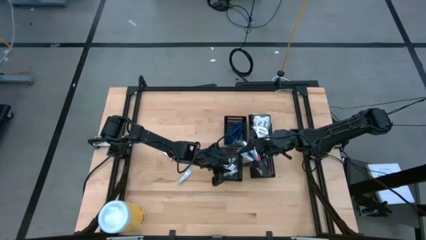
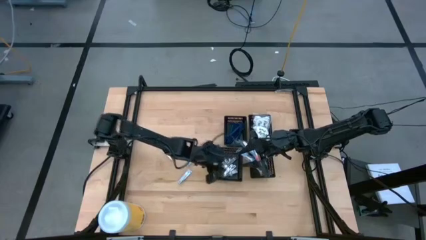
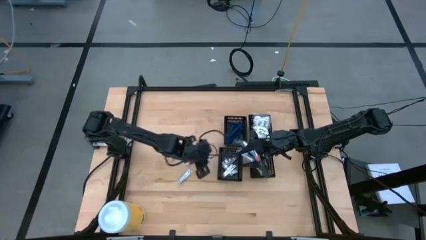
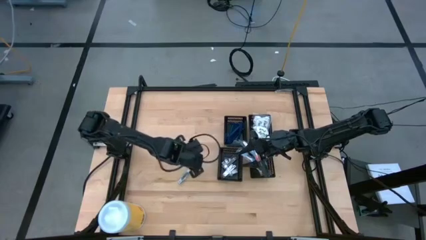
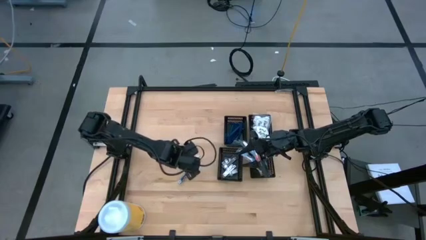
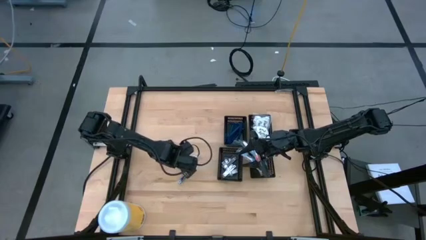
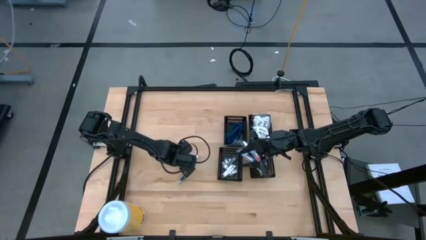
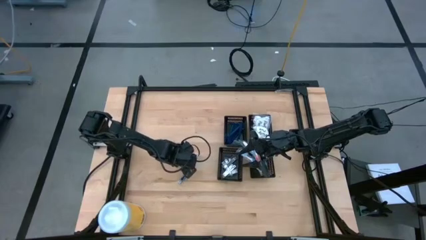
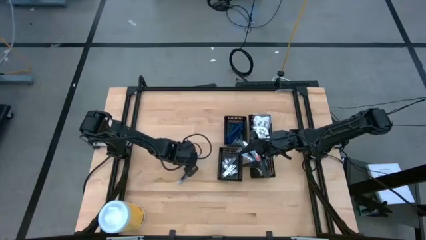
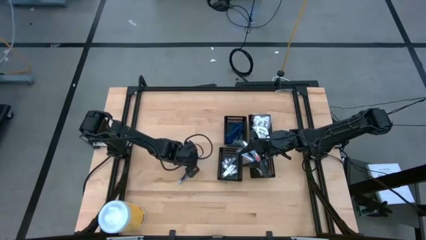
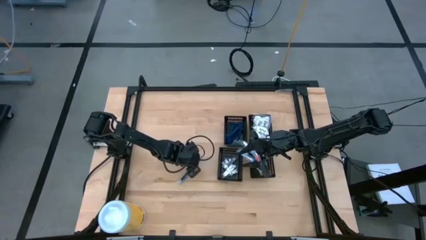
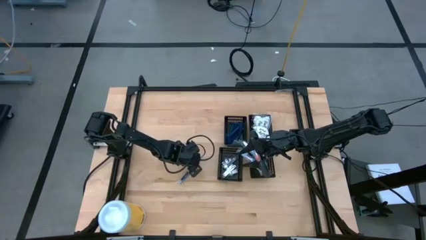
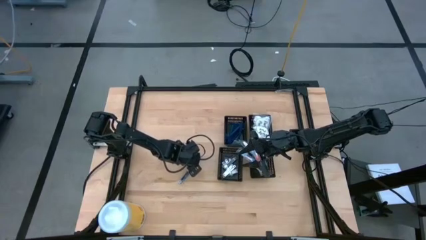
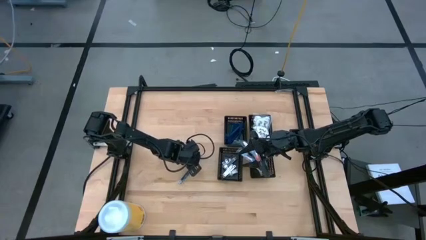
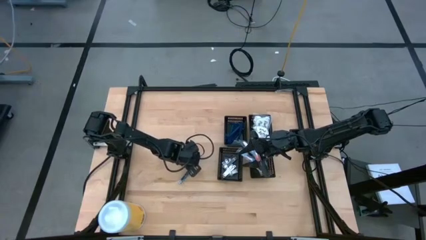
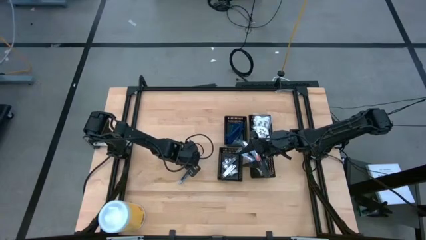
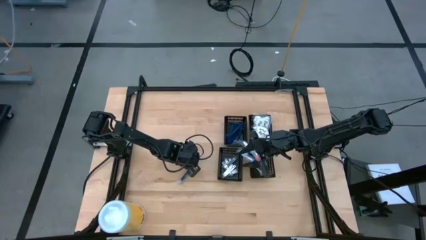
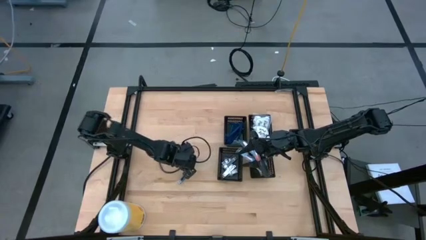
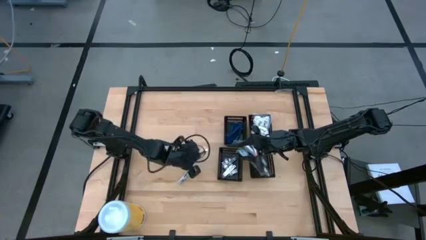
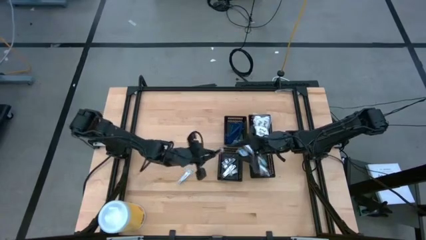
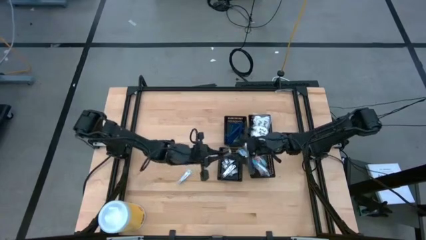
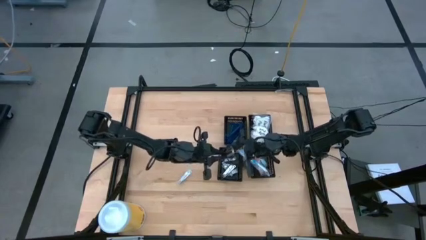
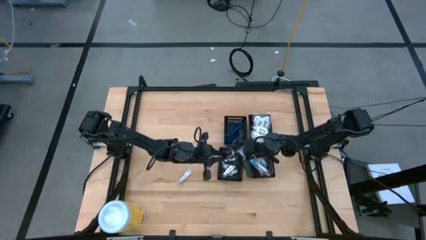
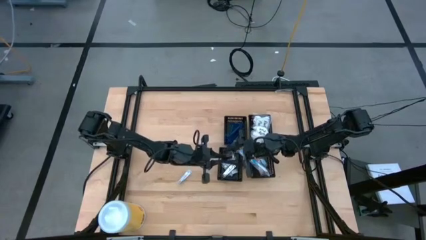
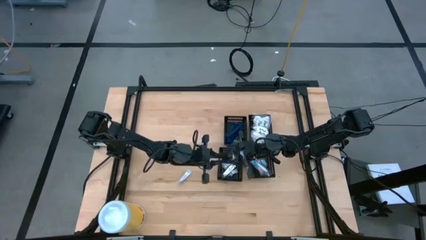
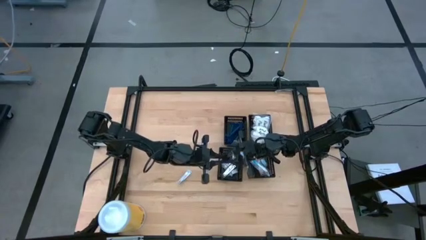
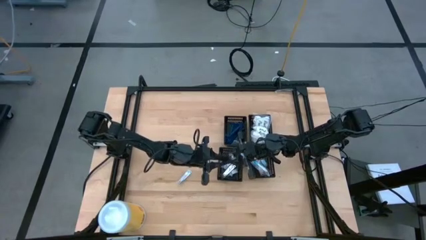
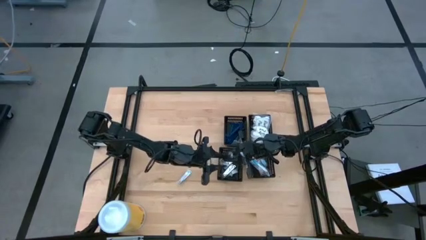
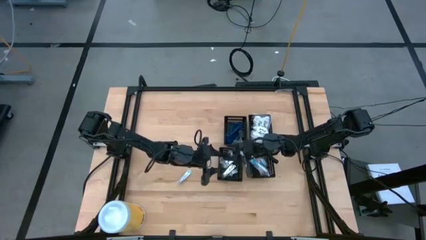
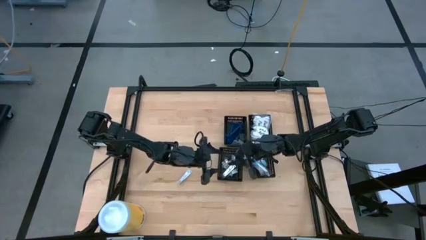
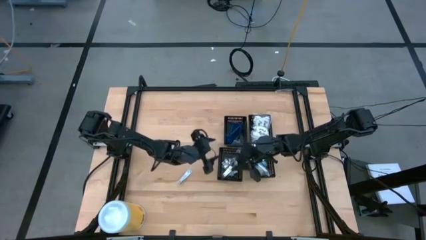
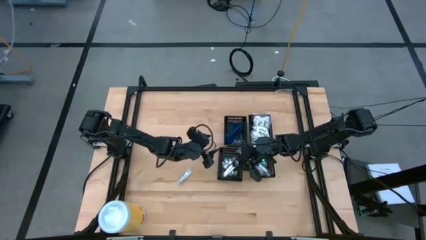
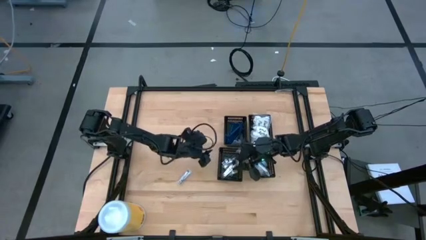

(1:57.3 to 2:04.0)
Task: Pick & Place Travel size toiletries
Put the nail cutter into the bottom left black basket

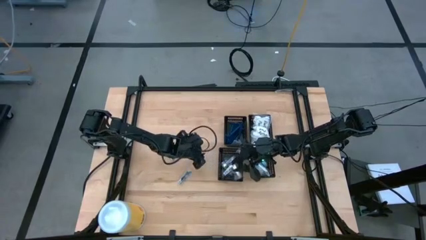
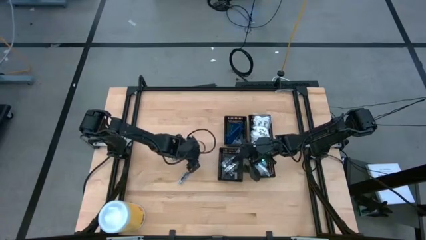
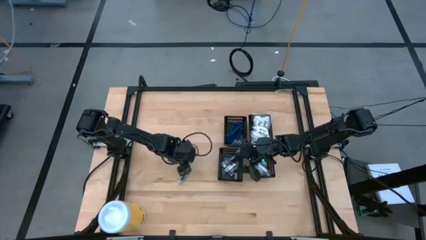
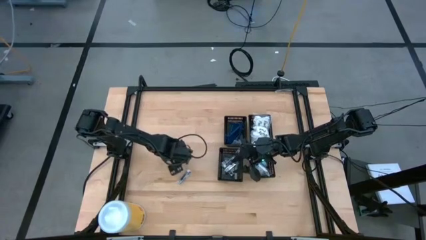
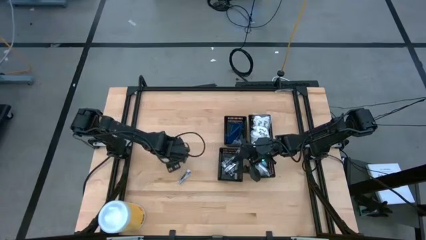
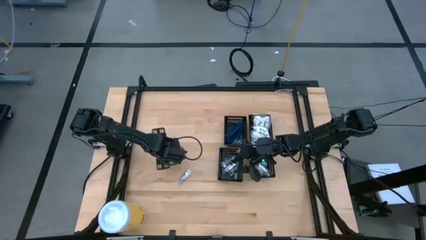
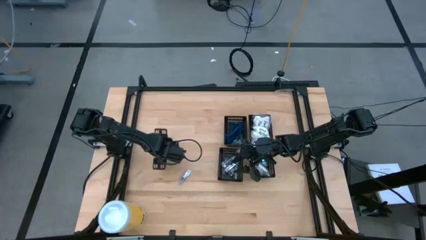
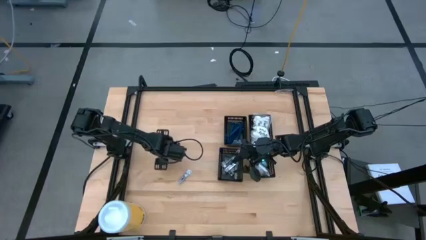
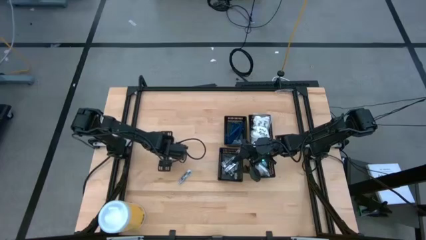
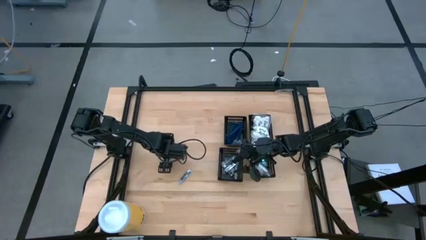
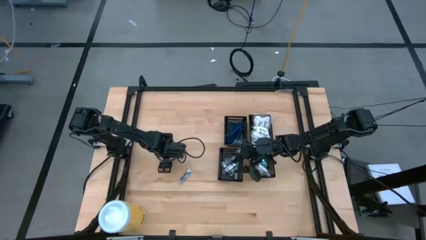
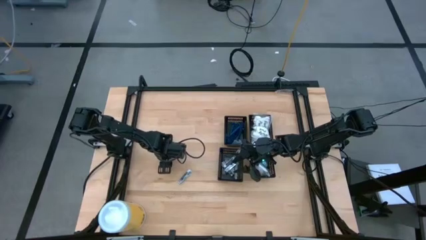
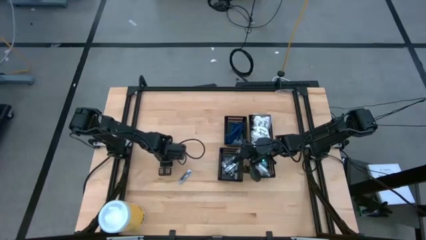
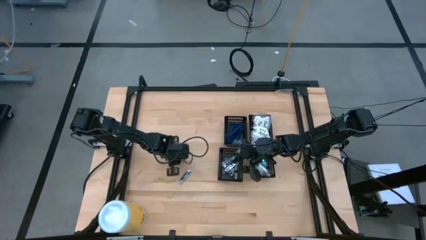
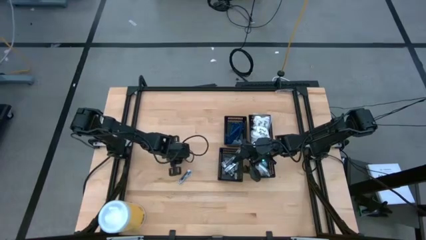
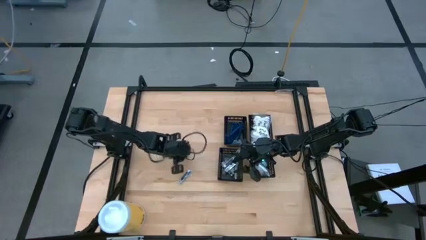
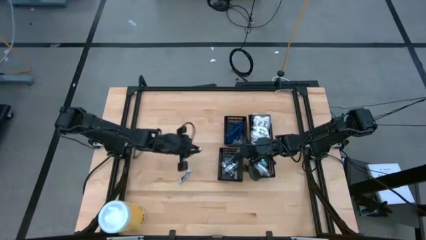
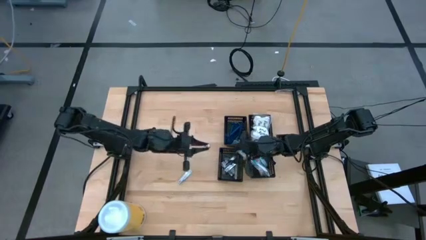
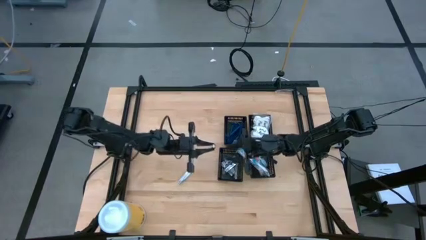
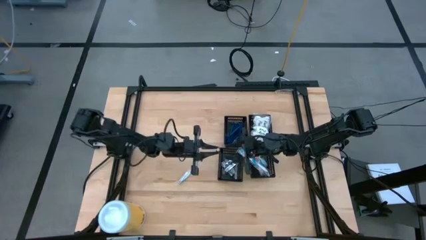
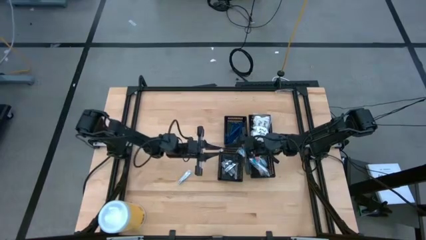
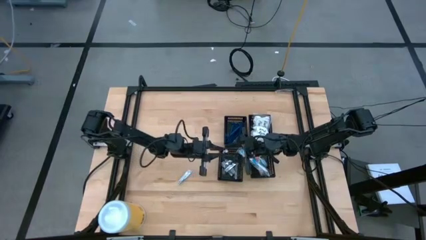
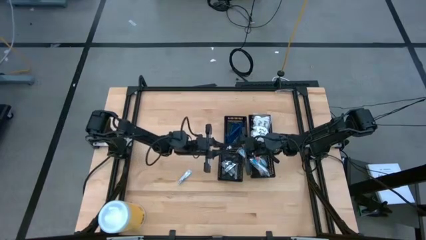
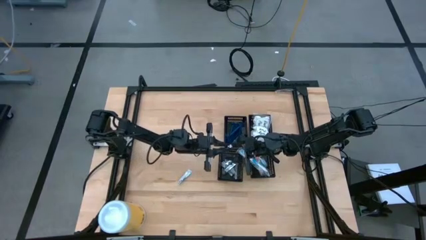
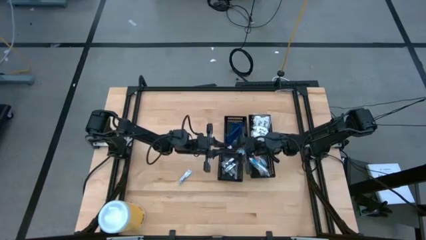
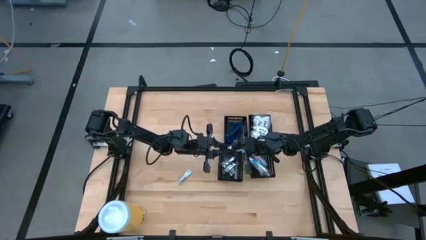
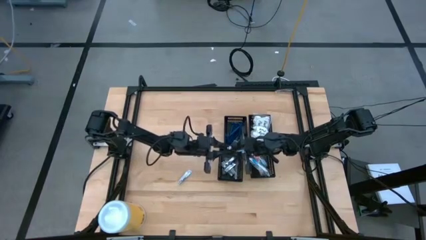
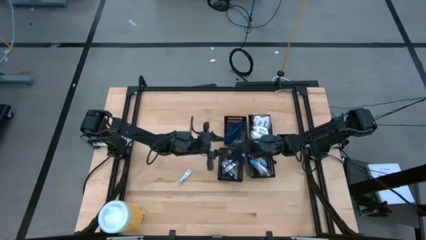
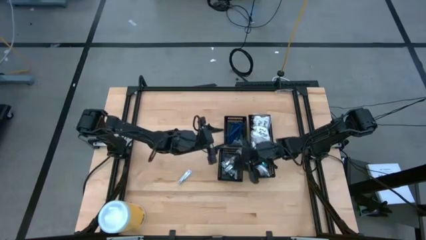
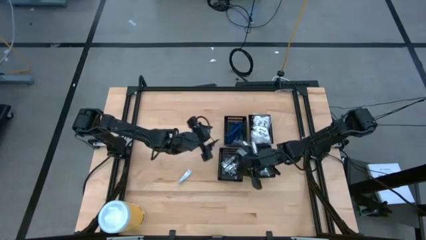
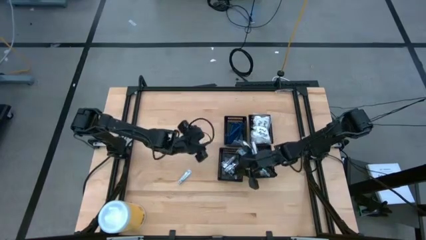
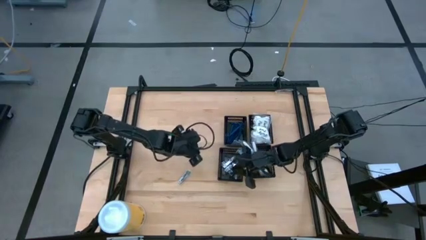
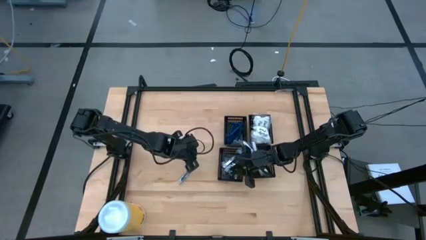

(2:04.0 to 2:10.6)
Put the nail cutter into the bottom left black basket

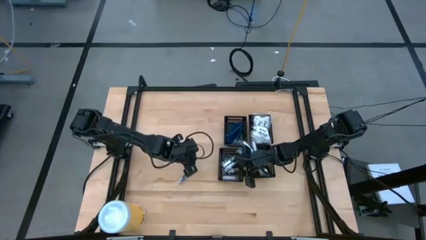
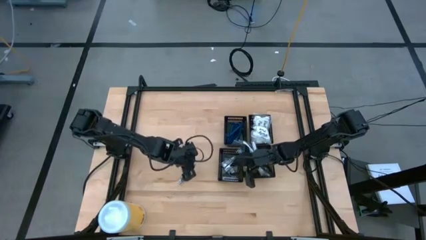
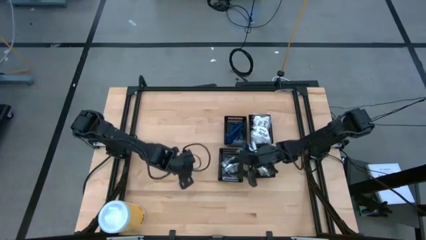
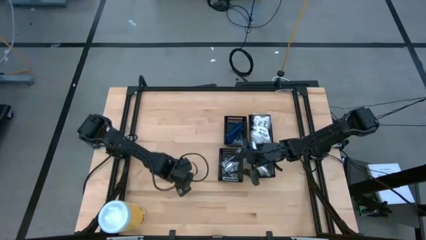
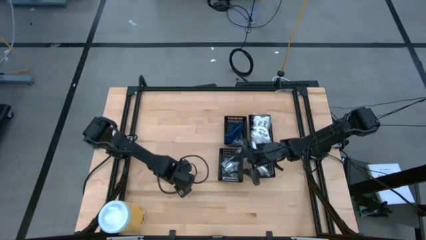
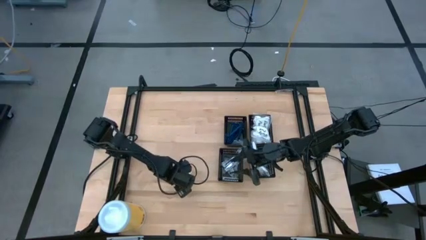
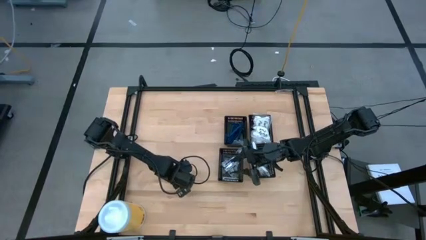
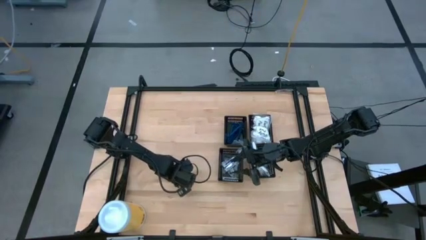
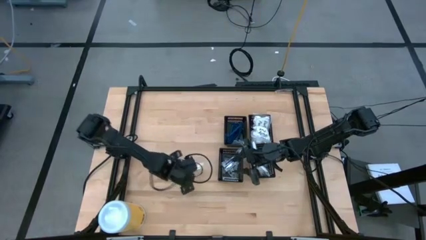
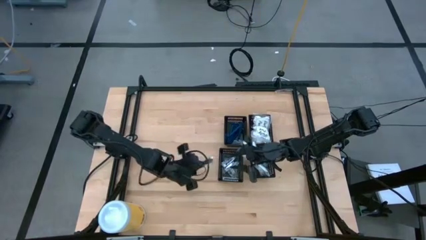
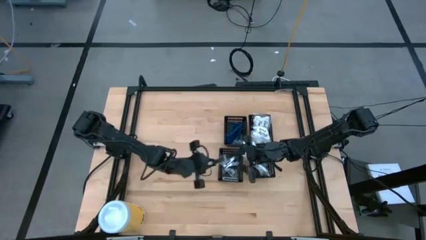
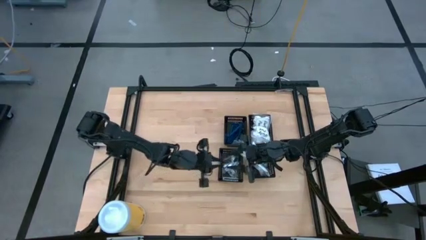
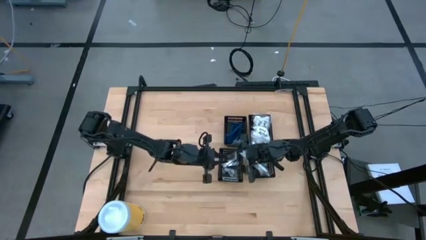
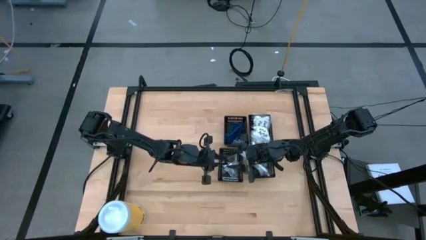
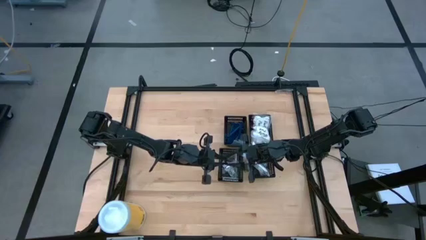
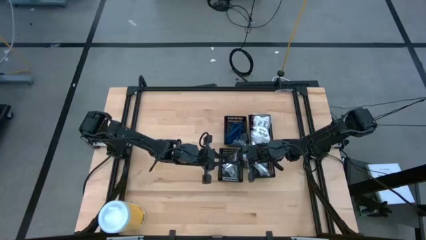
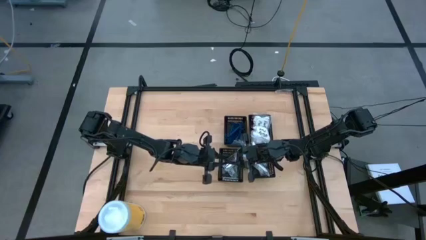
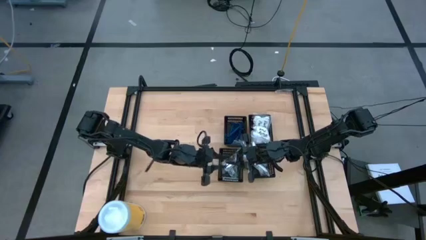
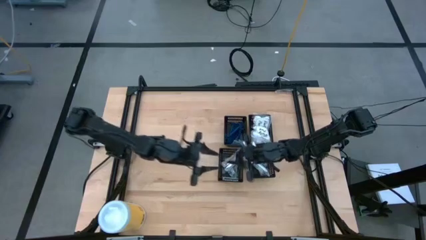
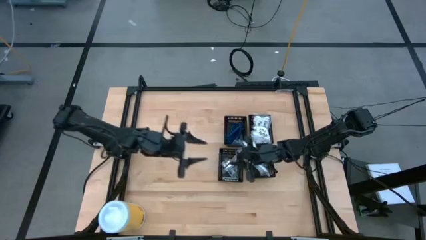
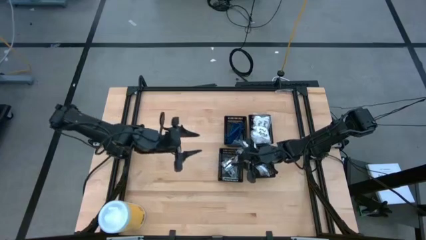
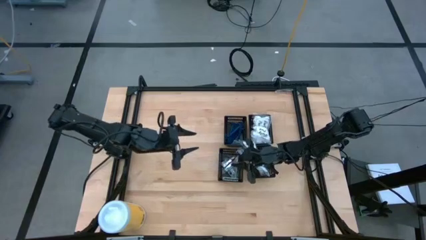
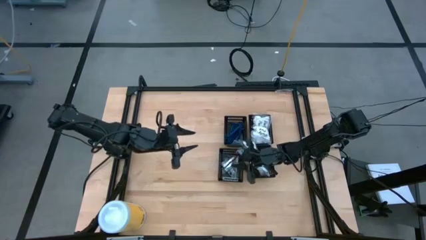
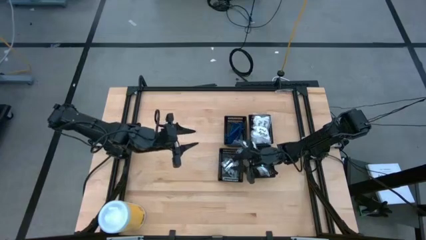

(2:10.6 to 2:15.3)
Put the nail cutter into the bottom left black basket
